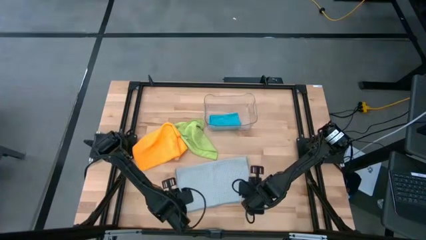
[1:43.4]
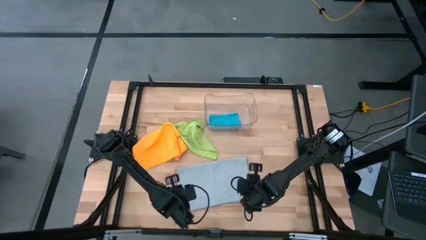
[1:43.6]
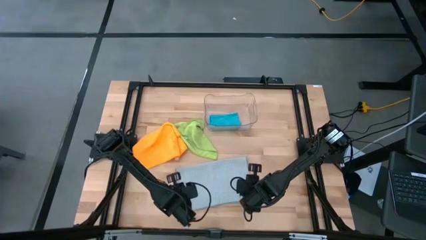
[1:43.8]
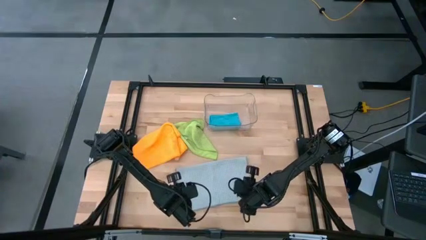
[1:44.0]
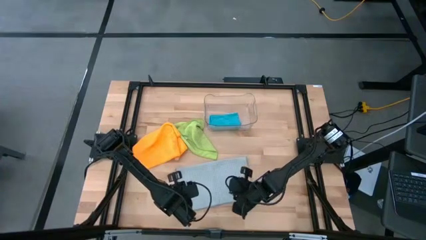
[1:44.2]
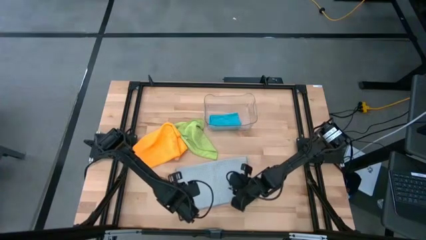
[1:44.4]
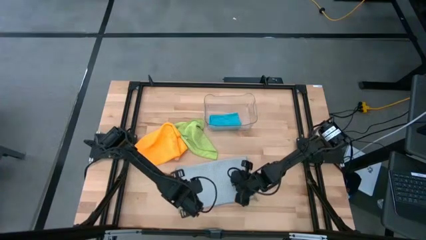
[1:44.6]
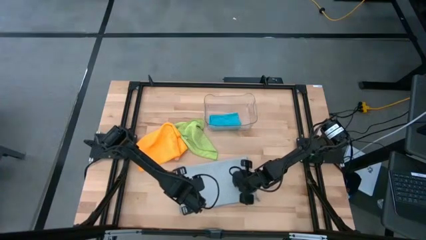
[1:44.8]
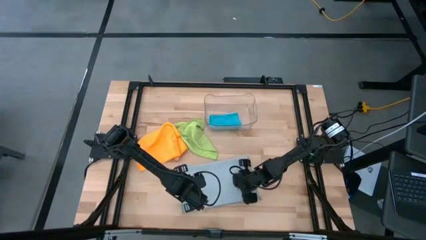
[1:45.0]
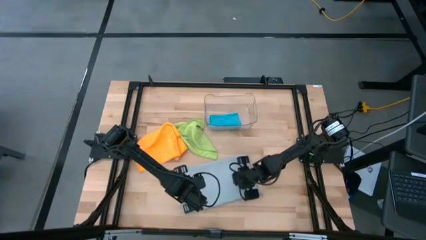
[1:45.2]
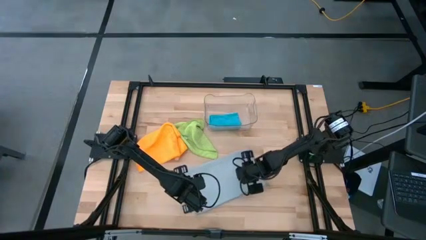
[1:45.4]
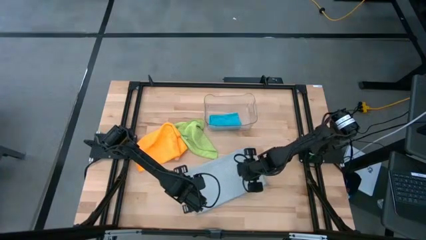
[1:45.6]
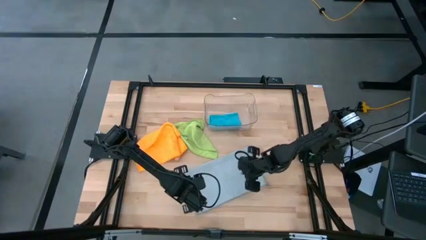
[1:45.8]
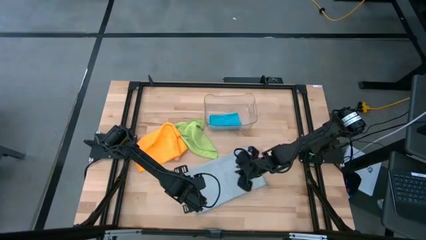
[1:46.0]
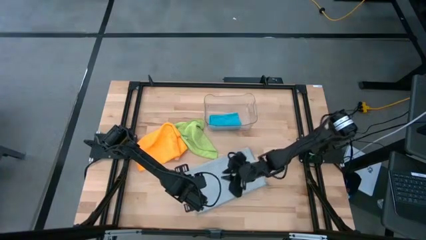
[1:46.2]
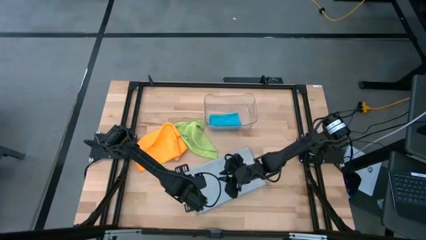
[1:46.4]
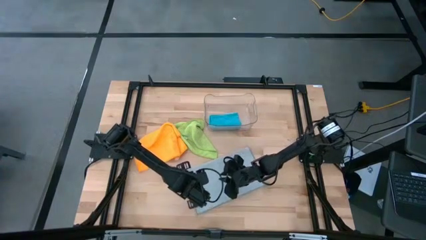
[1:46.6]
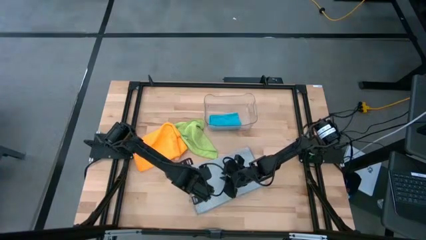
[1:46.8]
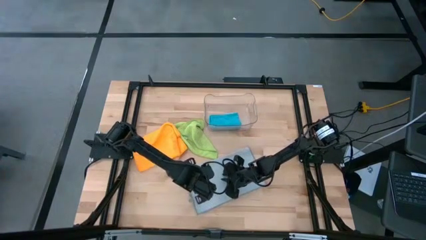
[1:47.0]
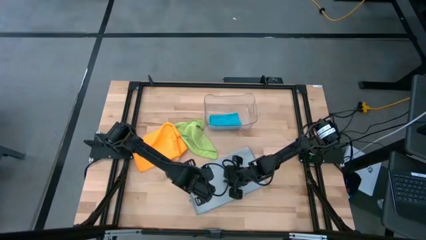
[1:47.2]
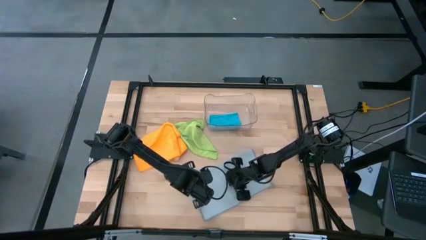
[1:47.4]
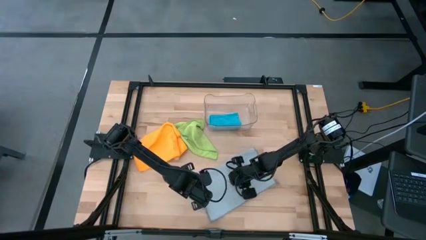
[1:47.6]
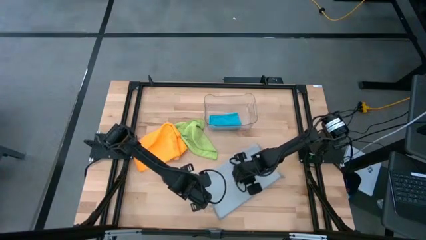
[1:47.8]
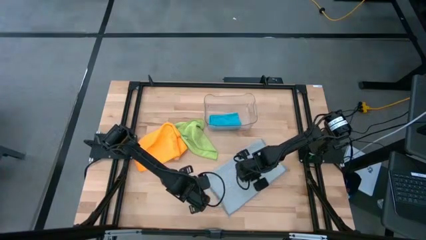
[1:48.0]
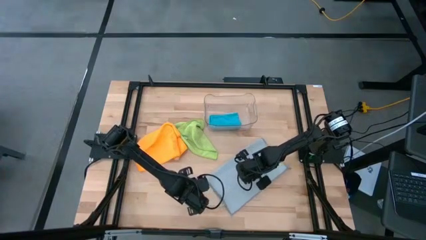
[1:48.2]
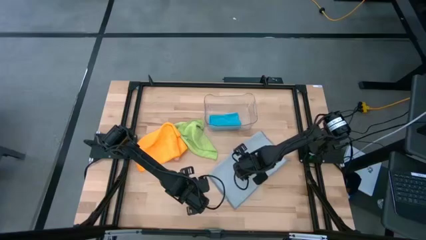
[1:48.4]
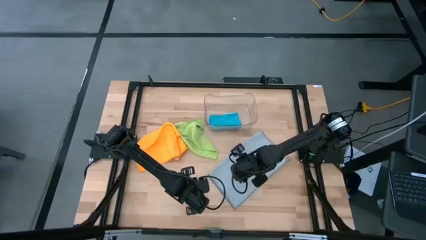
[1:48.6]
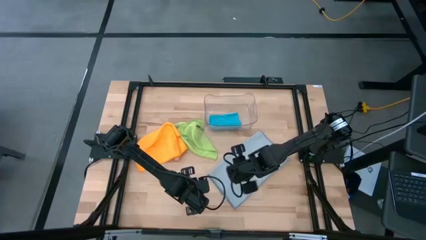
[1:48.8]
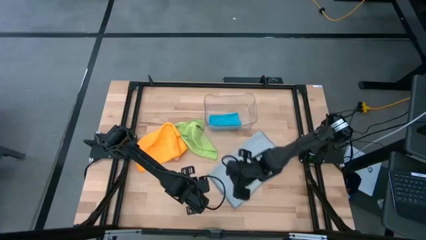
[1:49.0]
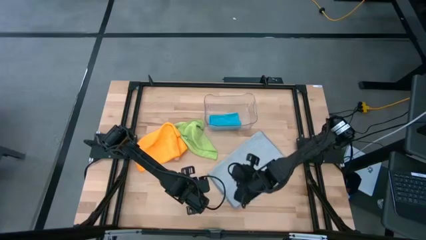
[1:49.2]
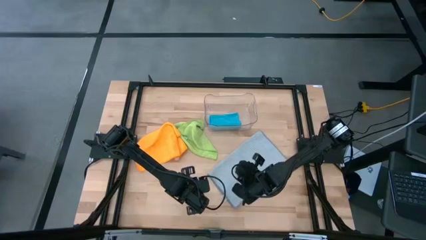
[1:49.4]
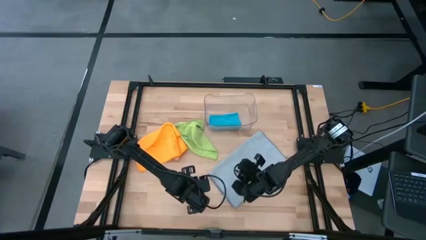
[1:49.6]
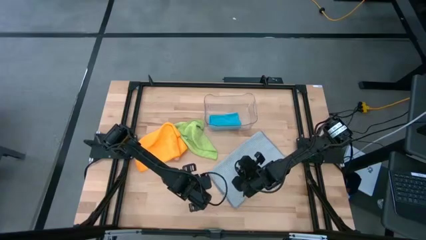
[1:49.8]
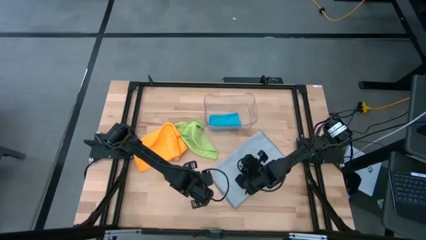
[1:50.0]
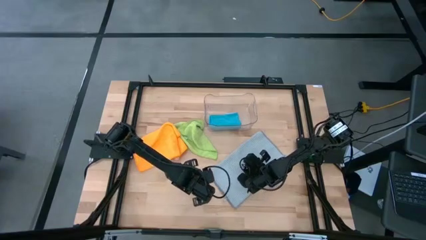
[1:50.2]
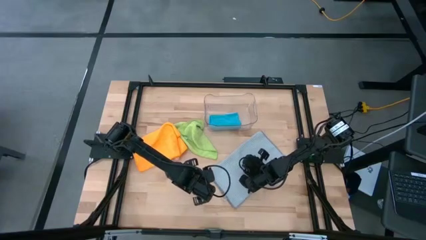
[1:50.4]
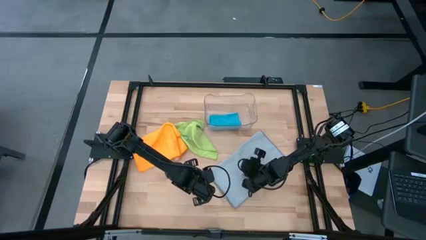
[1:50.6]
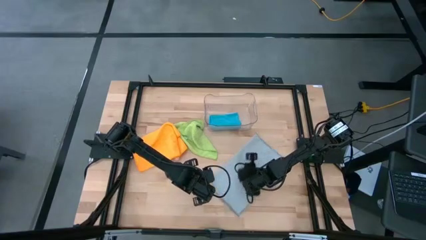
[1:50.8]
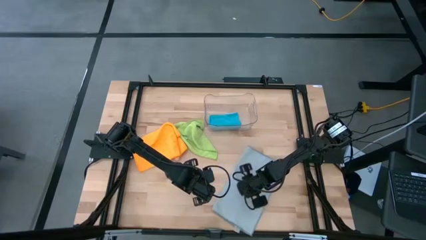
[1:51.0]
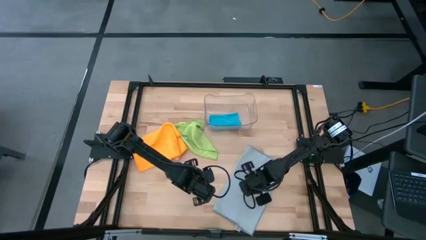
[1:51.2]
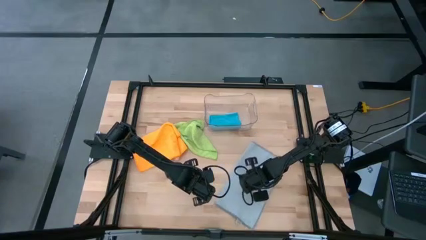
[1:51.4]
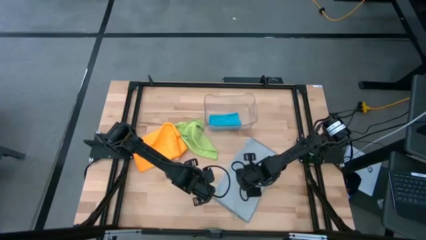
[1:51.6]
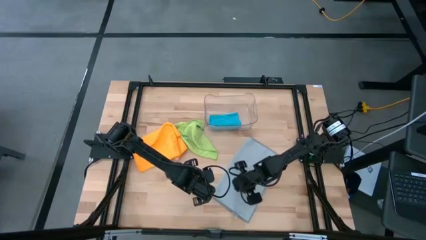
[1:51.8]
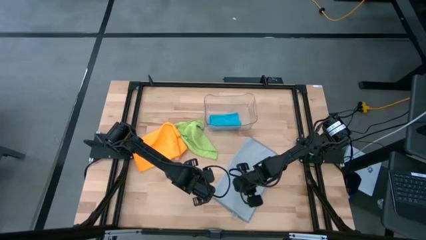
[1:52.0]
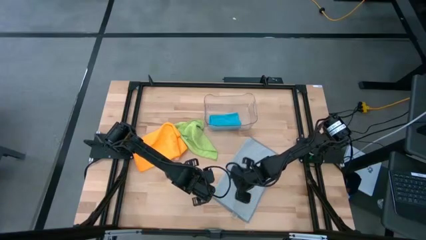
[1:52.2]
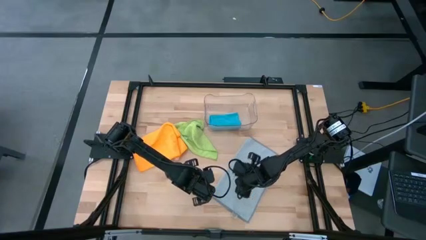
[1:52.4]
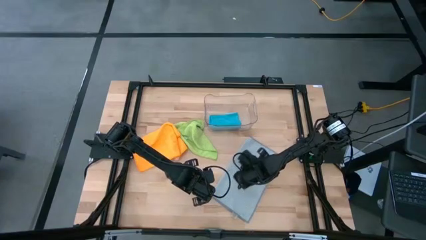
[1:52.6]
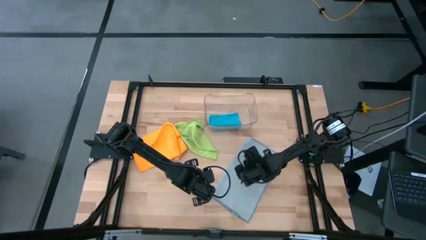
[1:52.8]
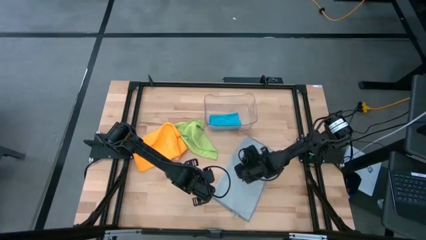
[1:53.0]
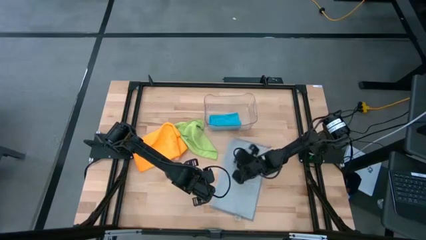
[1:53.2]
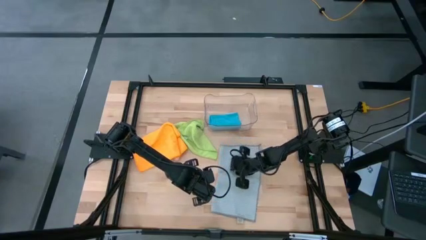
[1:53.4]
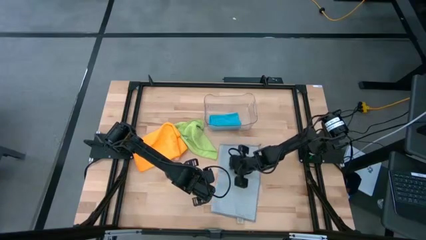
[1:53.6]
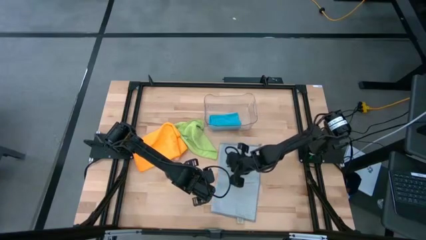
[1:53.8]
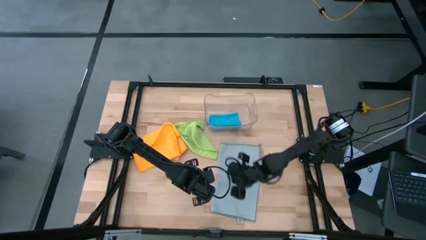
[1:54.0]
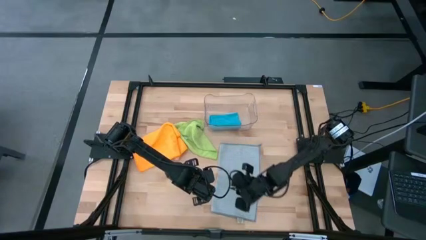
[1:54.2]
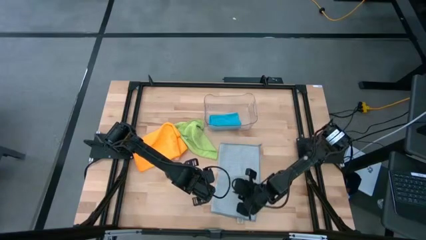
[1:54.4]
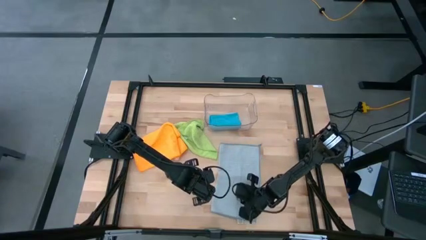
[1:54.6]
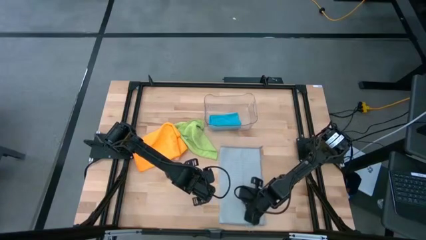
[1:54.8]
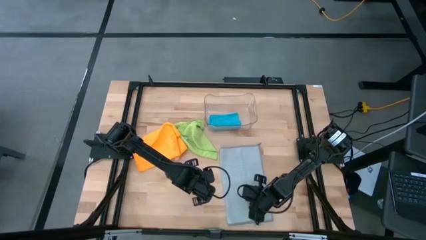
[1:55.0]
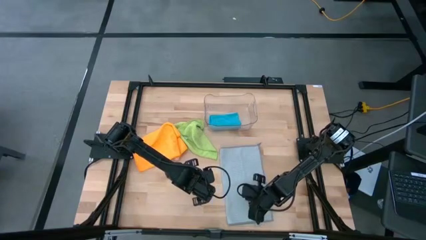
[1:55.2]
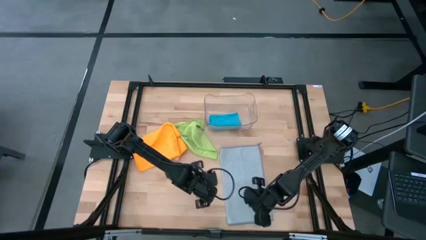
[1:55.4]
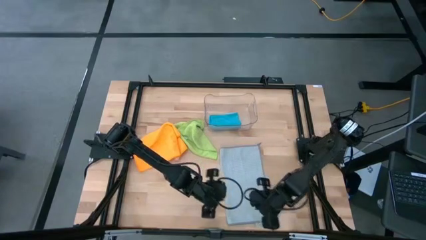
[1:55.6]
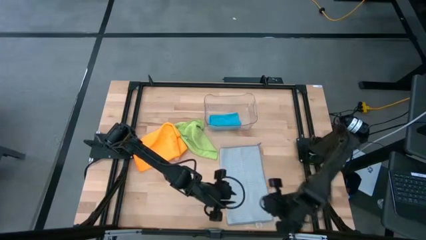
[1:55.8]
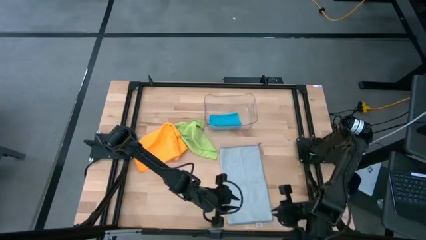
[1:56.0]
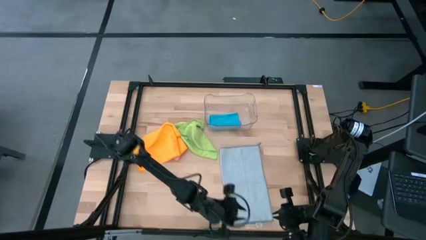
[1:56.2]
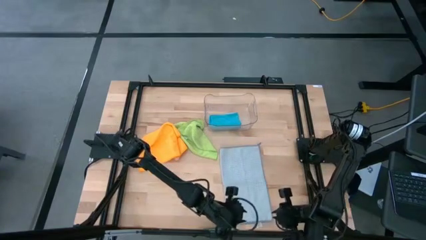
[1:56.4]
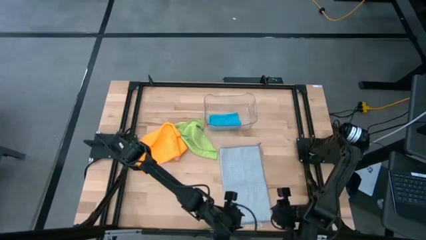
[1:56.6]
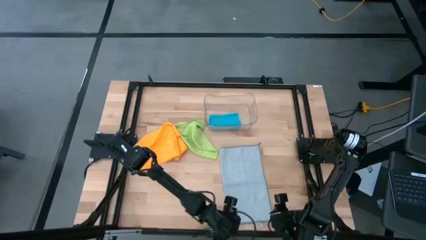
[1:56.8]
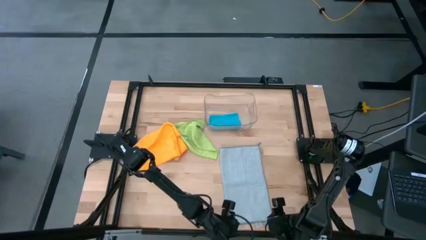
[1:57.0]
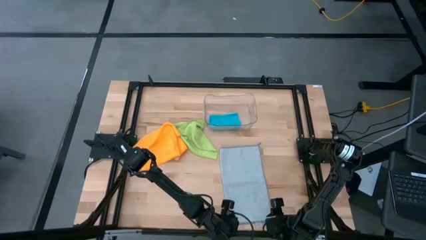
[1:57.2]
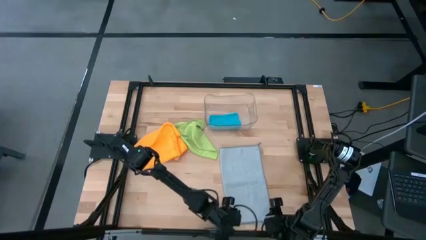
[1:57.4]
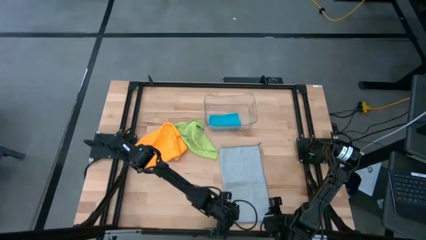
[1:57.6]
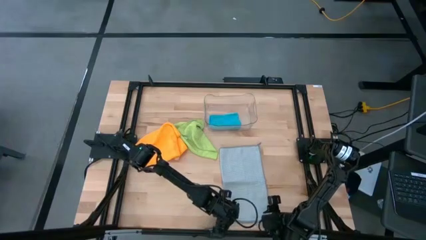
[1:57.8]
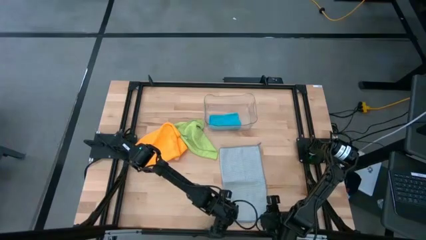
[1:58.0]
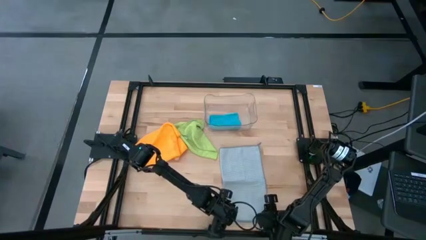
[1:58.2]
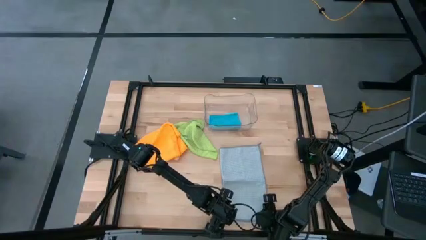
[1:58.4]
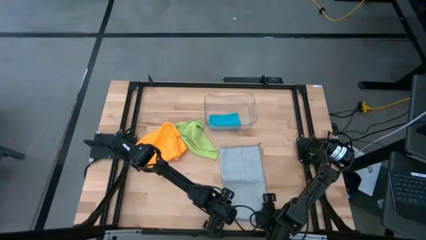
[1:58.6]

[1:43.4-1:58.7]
Task: Fold microfiber towels
Fold the gray towel

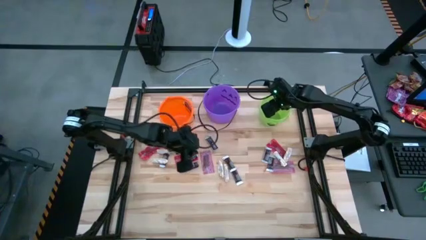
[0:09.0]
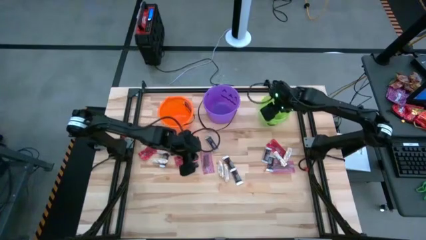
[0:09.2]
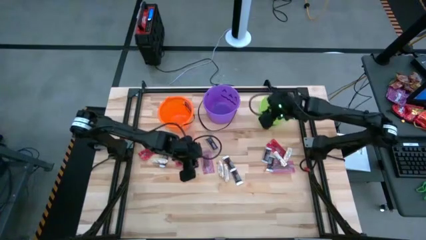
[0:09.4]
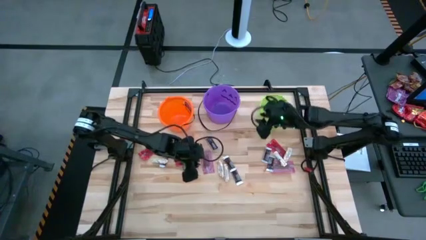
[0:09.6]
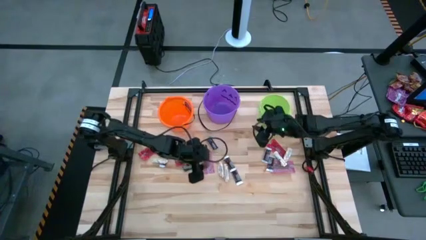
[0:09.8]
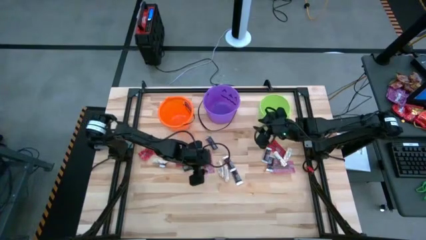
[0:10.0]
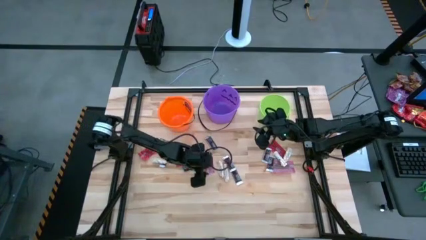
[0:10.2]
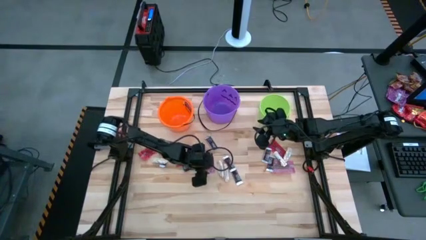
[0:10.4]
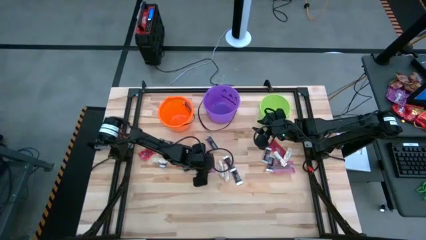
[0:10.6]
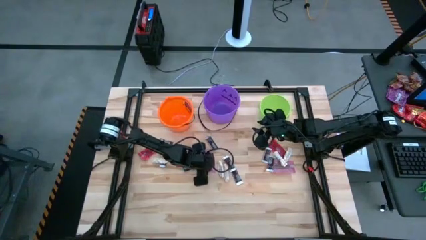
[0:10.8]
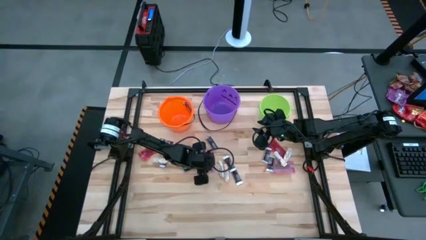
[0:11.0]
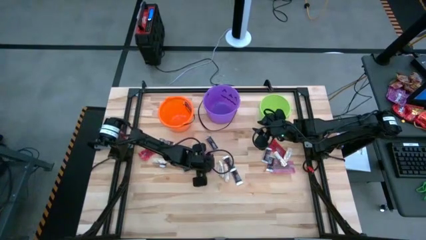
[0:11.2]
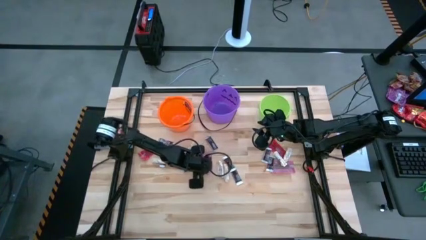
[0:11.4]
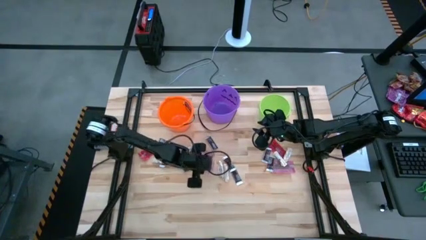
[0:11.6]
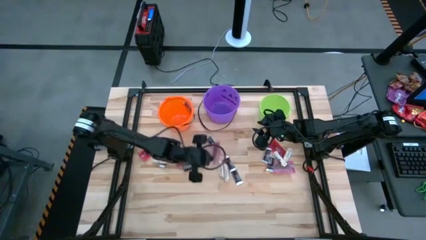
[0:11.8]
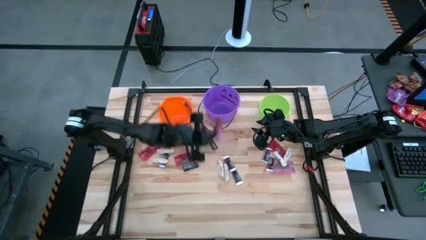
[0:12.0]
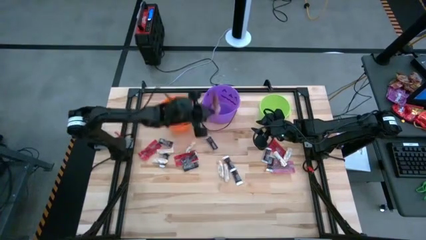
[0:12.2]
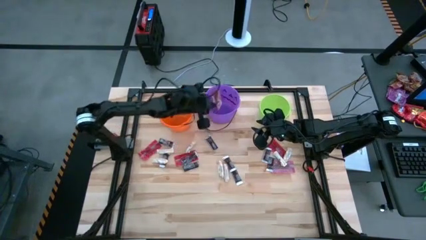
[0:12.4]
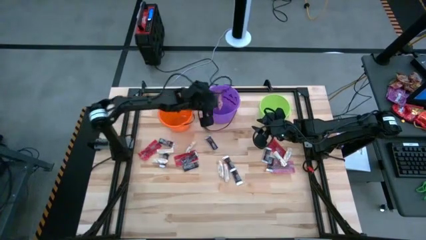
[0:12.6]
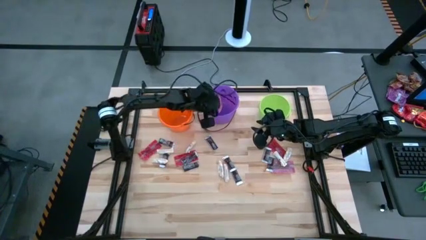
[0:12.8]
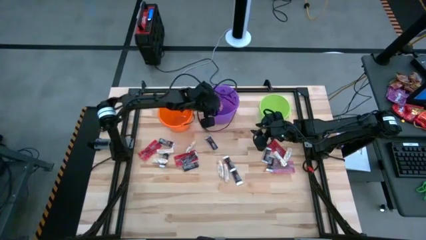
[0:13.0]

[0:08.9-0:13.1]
Task: Sort candy by brand, put in halloween buckets
Put the red candy pack into the purple bucket
